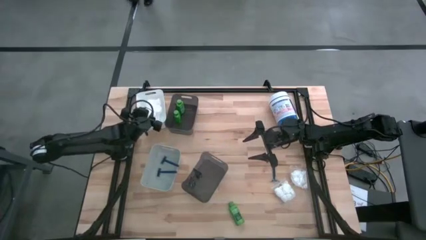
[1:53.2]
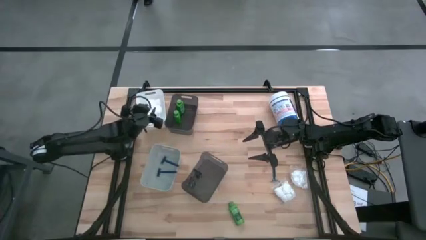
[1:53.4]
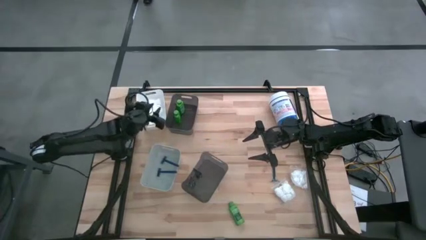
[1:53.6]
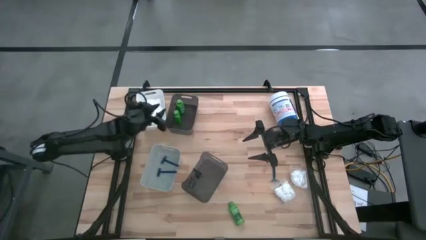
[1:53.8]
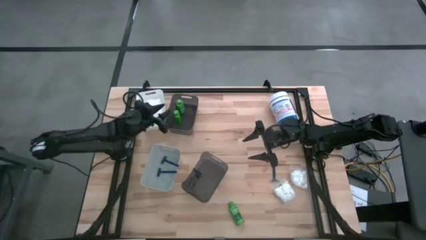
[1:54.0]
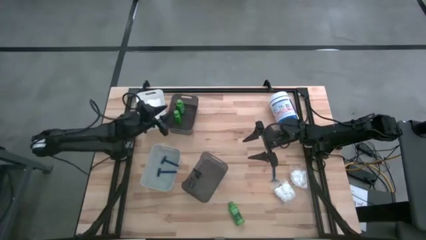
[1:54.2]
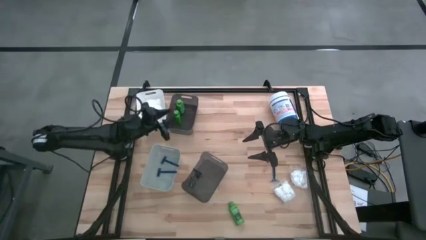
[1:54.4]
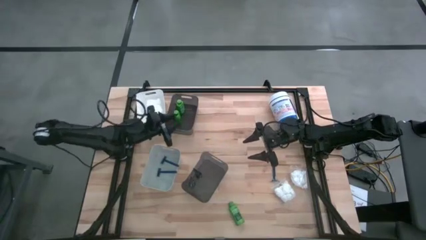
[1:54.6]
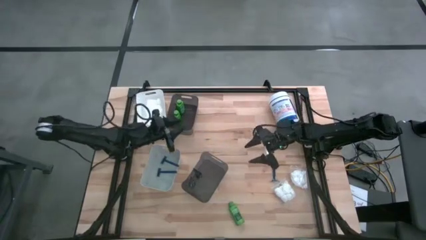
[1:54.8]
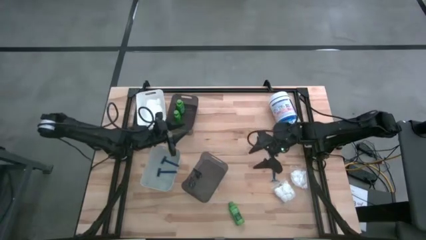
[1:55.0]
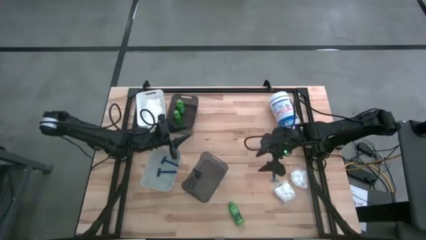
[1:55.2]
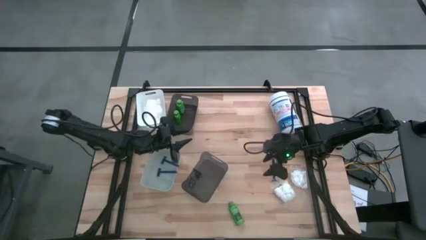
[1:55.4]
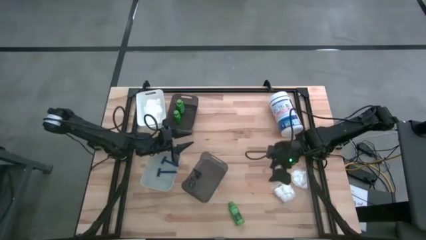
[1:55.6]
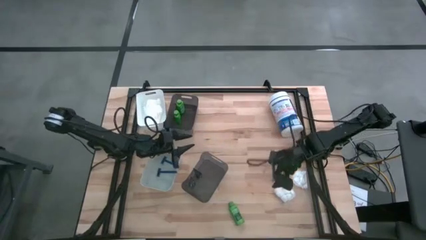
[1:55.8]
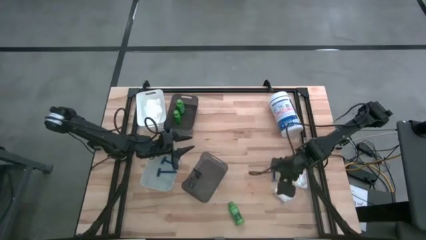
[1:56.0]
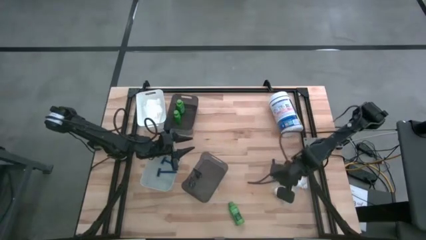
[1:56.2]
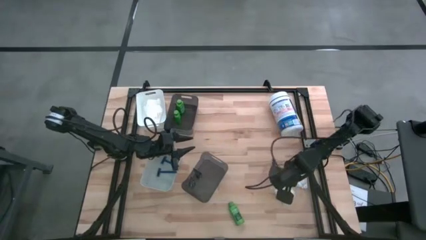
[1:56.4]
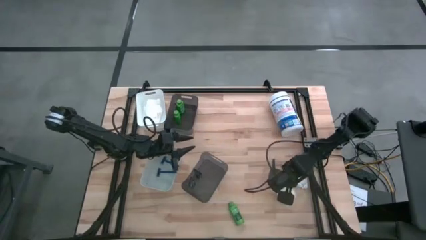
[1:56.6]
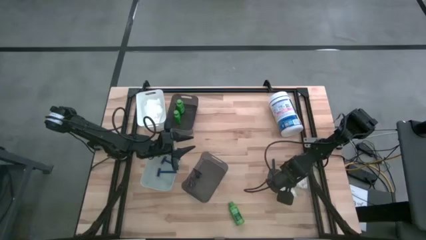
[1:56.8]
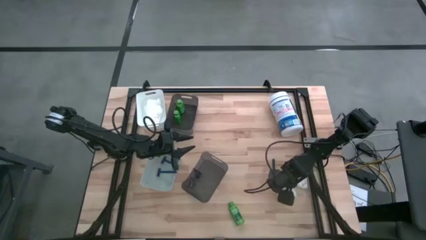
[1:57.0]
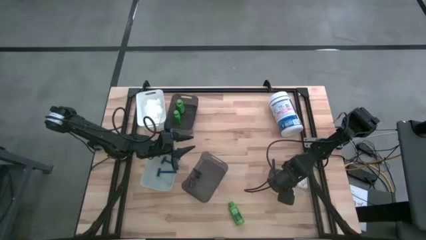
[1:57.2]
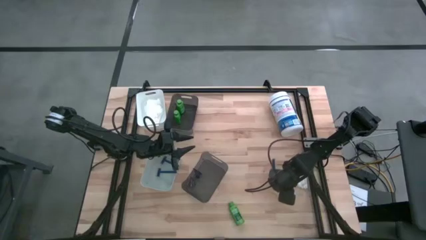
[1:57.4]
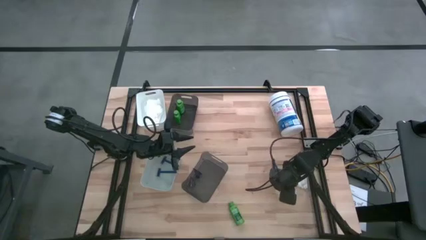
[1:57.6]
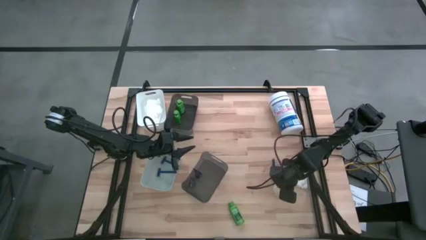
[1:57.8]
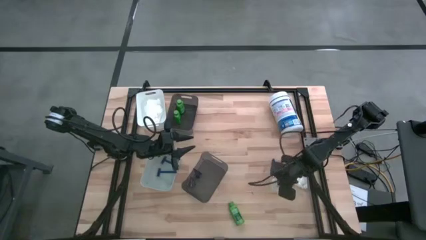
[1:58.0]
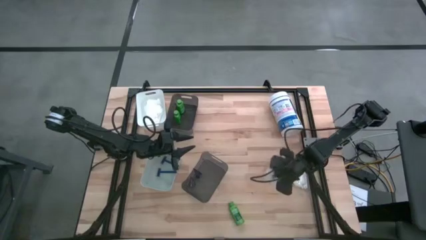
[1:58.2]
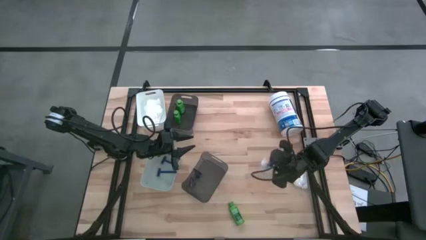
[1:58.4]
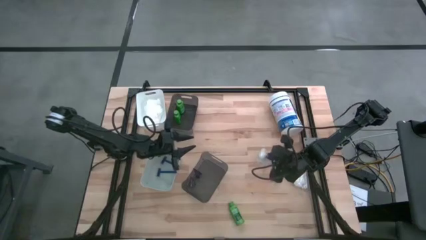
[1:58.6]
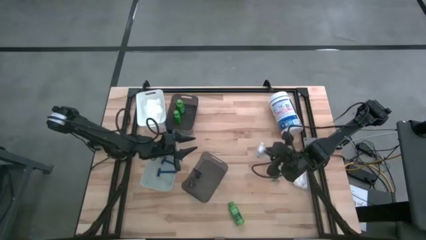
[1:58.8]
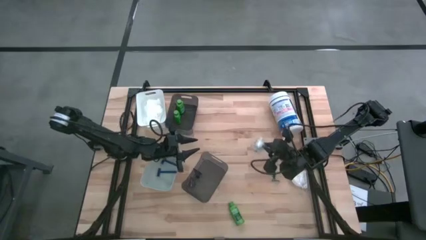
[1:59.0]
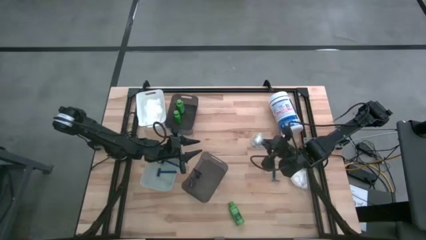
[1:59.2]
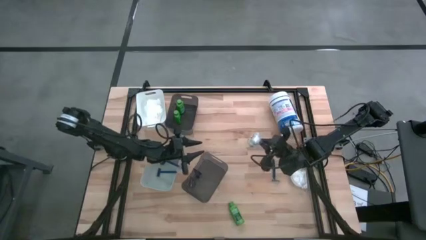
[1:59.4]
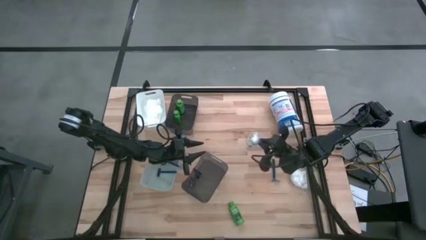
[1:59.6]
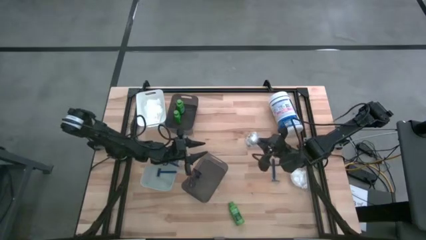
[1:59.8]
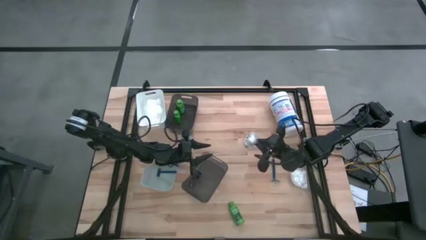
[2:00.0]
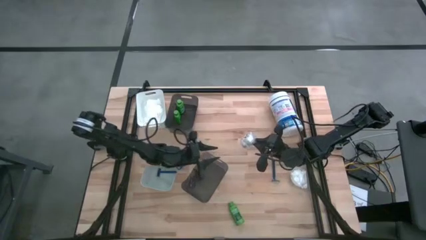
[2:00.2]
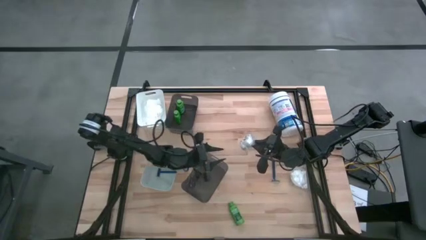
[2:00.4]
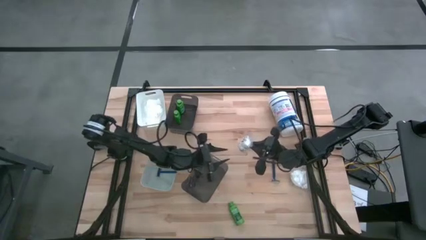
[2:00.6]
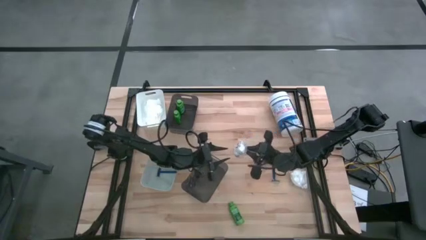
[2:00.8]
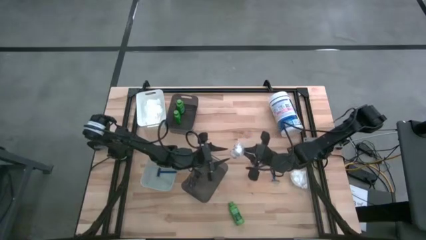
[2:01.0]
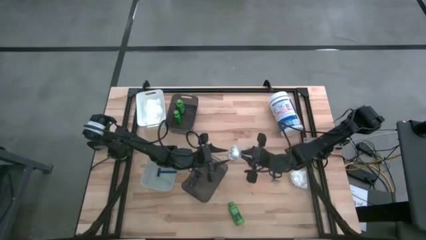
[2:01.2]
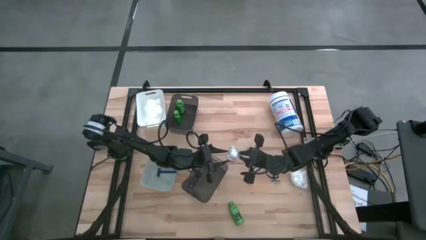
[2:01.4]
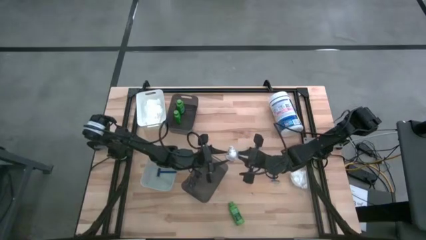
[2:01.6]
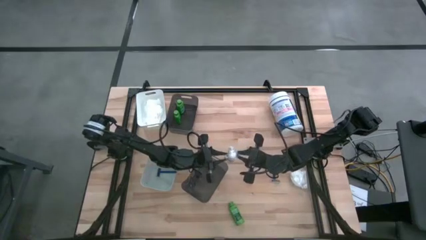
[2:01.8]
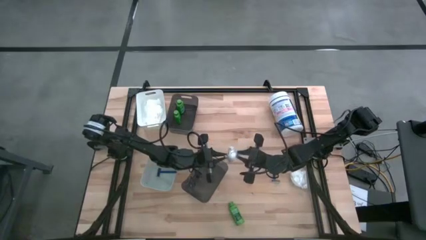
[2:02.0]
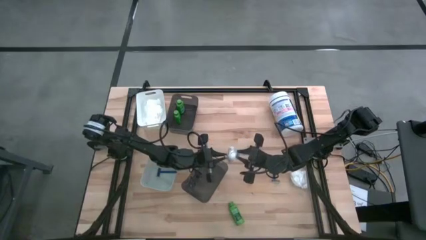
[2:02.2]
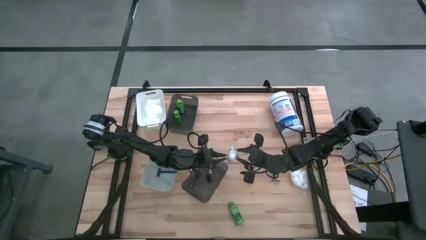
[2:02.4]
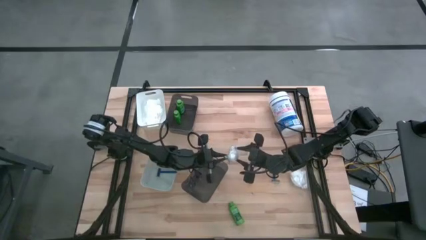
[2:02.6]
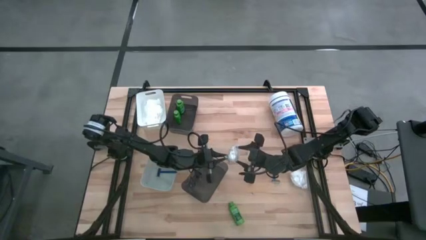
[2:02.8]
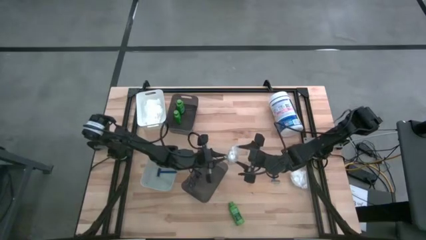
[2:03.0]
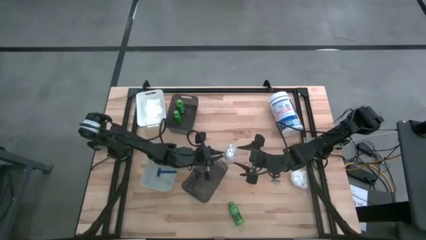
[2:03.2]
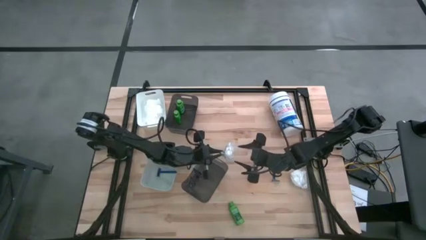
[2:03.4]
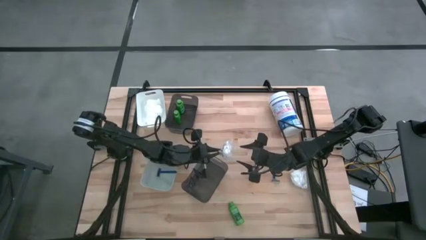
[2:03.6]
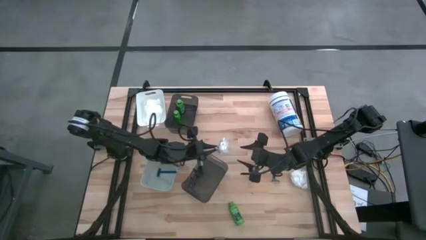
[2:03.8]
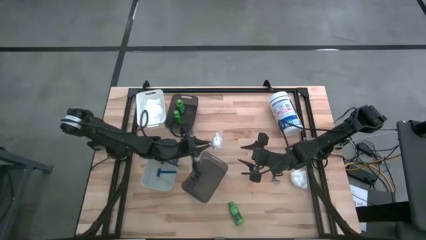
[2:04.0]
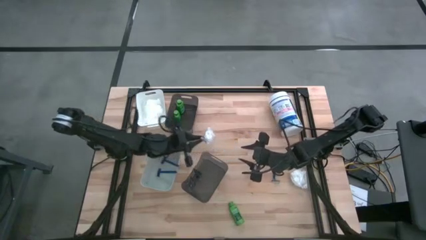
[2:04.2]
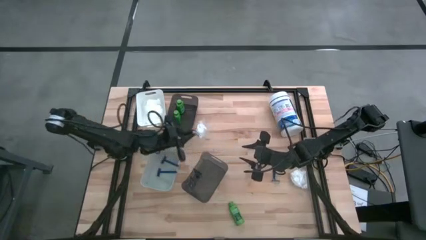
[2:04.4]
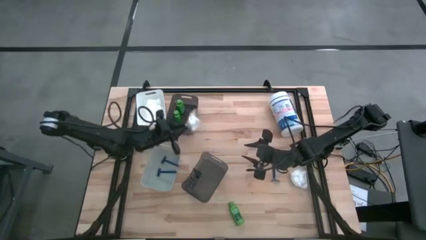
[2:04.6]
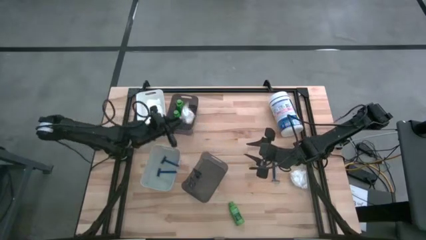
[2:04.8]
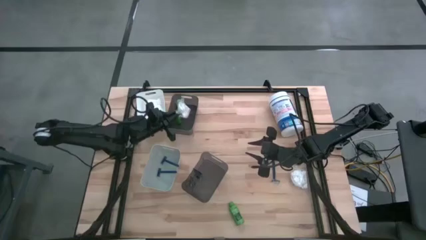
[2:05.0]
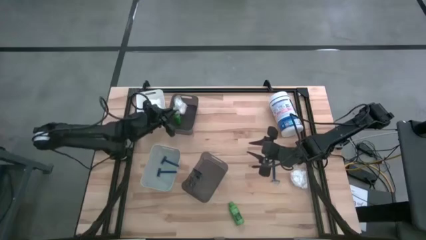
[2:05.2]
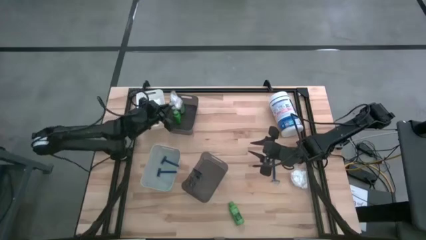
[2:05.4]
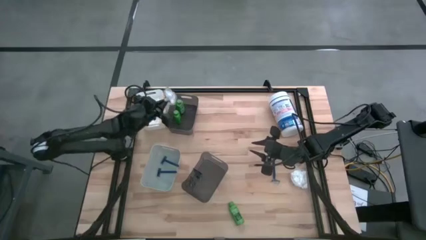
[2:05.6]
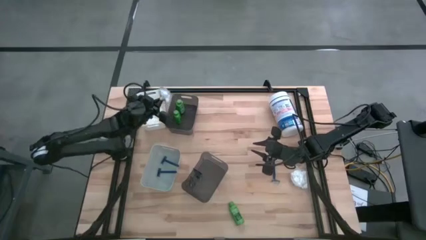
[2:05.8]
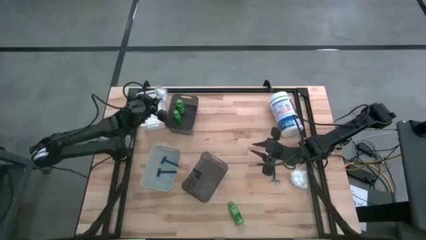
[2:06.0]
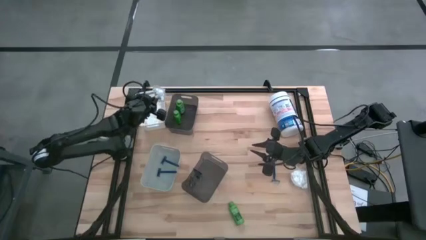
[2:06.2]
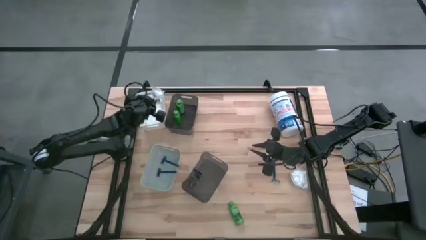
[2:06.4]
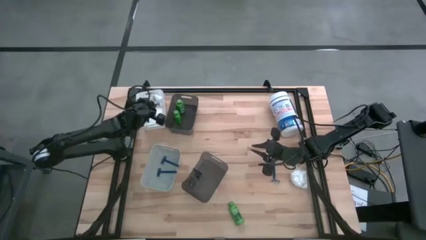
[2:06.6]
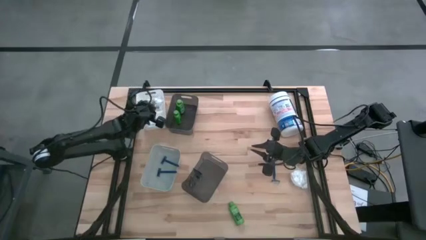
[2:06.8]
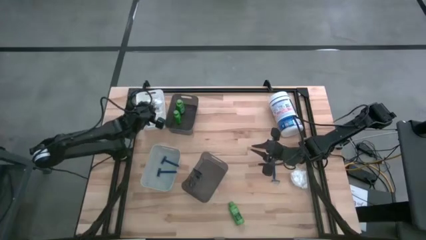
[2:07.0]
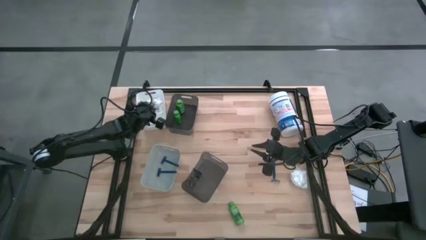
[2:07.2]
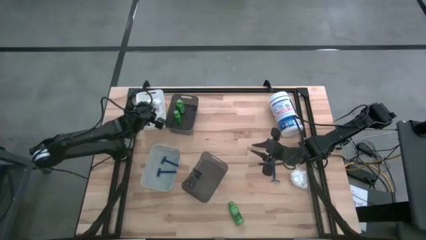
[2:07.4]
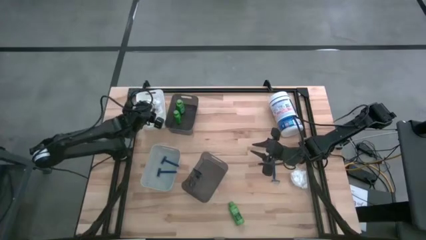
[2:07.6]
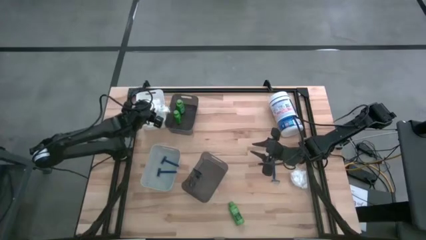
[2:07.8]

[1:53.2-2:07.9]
Task: Pick & Place Travel size toiletries
Put the cotton pack into the white bin

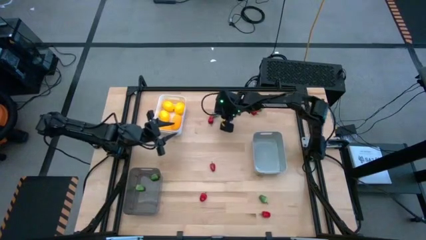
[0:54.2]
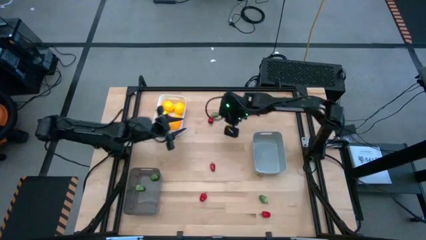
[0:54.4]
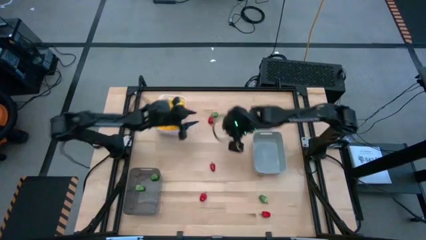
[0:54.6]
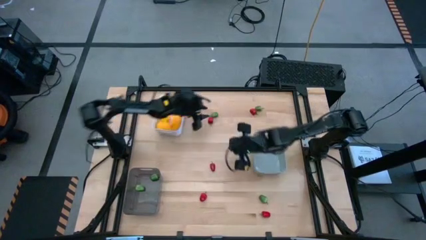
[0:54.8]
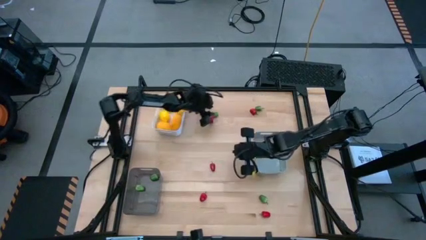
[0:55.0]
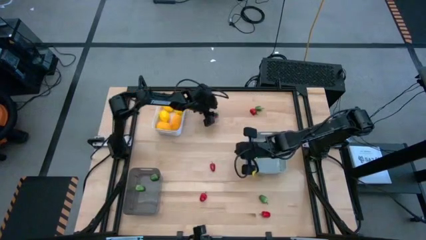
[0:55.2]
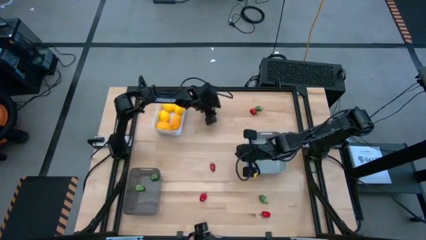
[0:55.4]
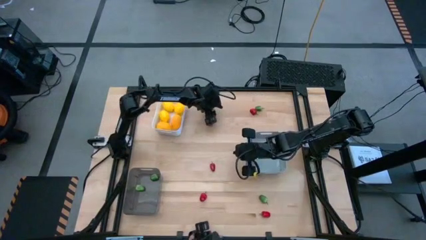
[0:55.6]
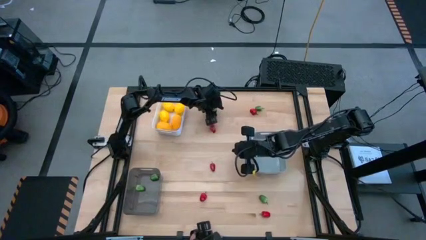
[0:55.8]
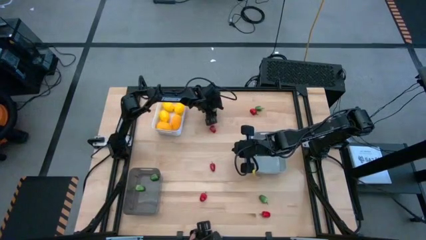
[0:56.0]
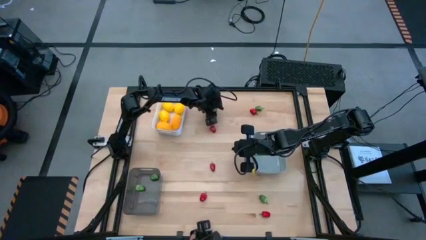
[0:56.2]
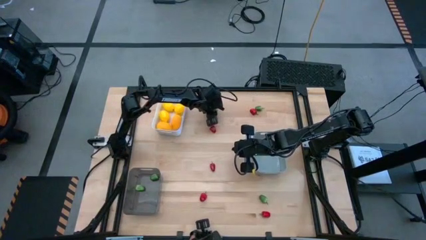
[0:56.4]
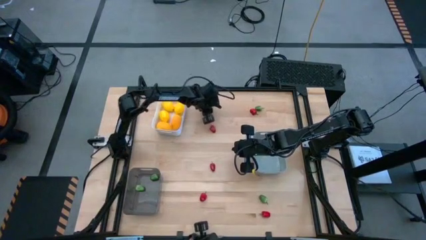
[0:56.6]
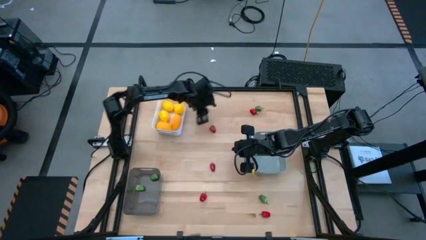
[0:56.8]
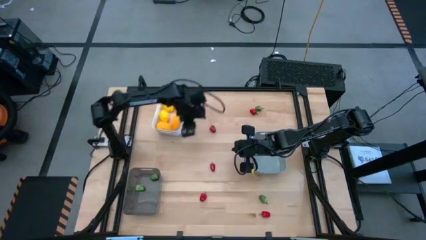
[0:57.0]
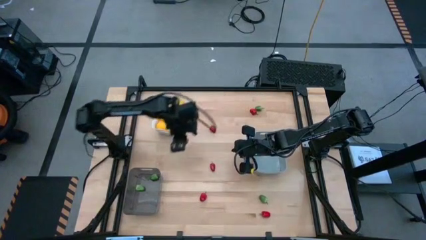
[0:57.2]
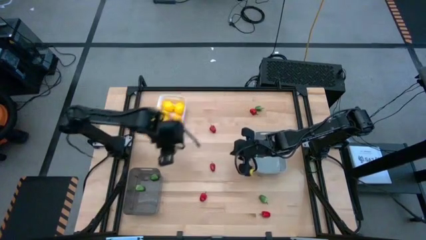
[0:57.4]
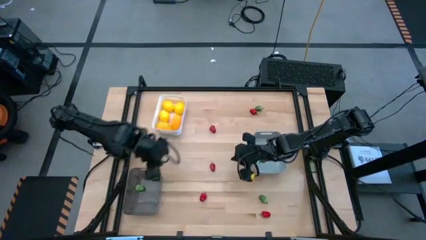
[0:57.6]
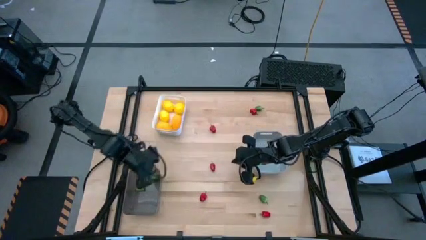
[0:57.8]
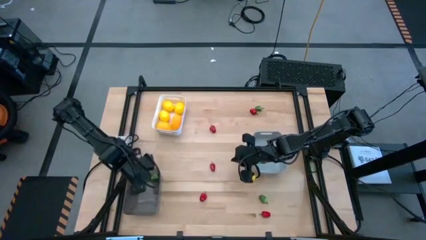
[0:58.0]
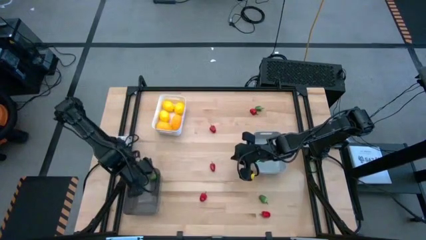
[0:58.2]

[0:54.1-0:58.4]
Task: Sort produce into baskets
Put the top left green chili pepper into the transparent black bin
